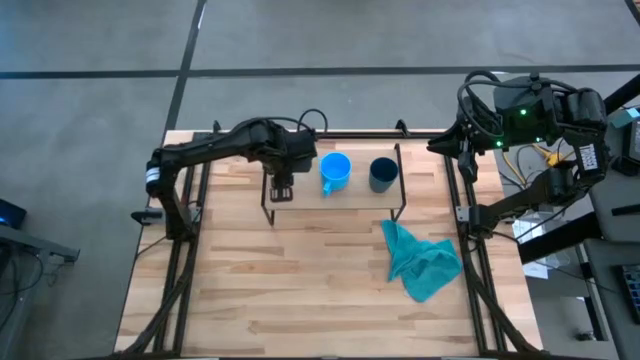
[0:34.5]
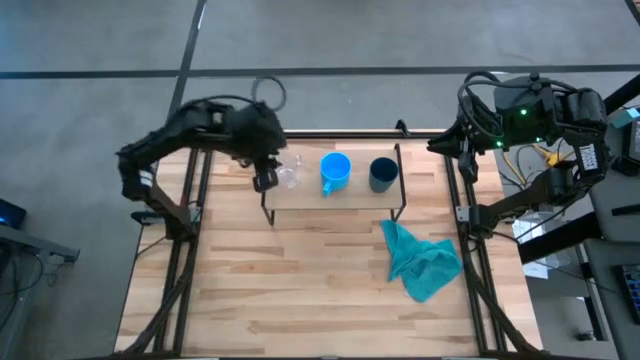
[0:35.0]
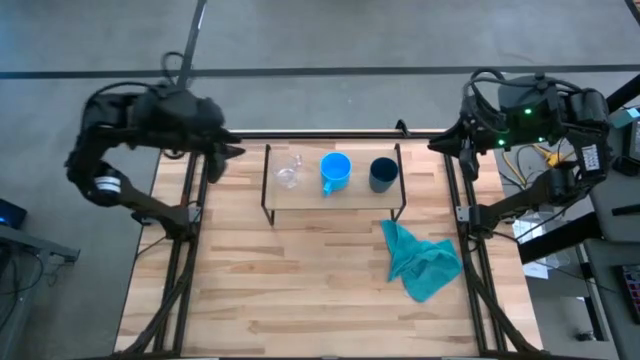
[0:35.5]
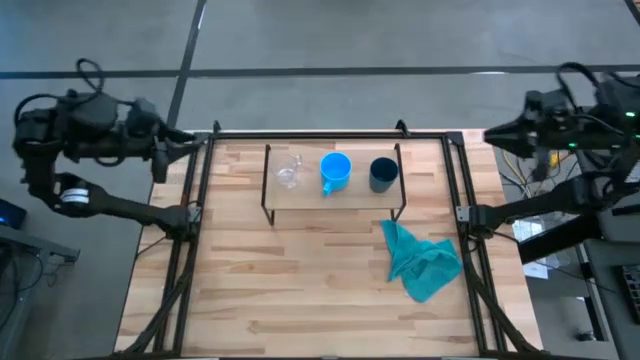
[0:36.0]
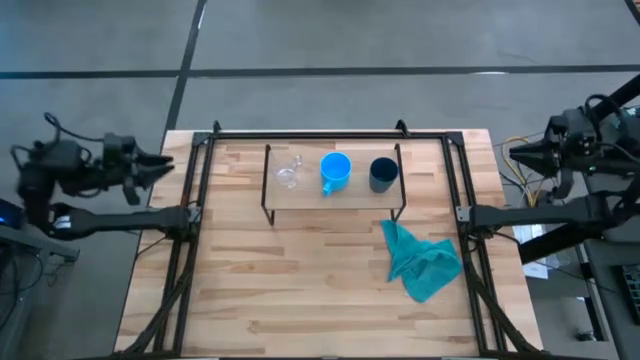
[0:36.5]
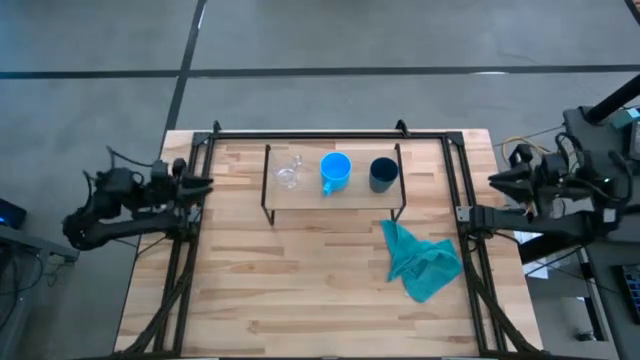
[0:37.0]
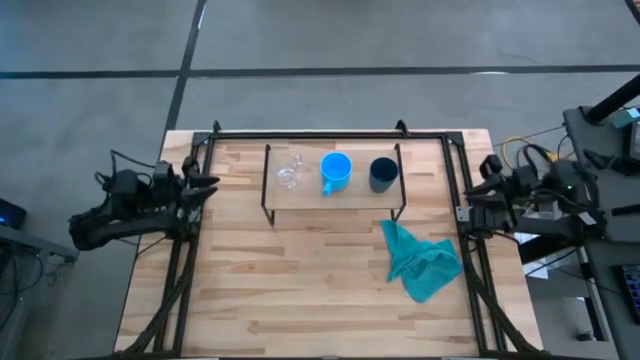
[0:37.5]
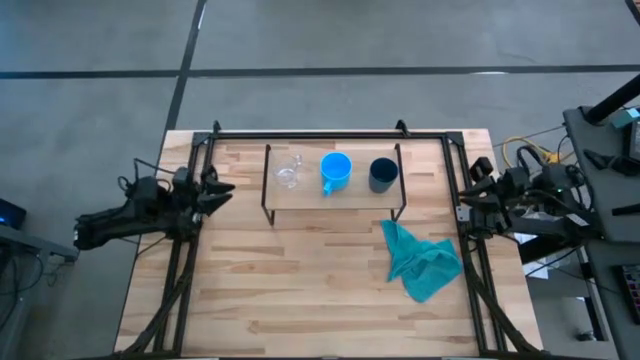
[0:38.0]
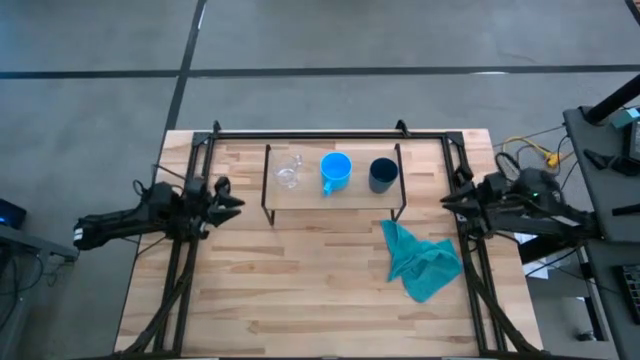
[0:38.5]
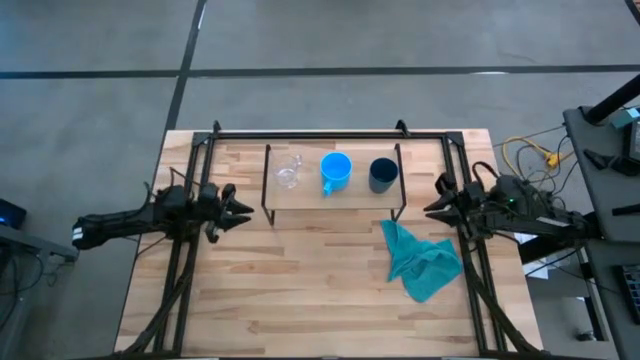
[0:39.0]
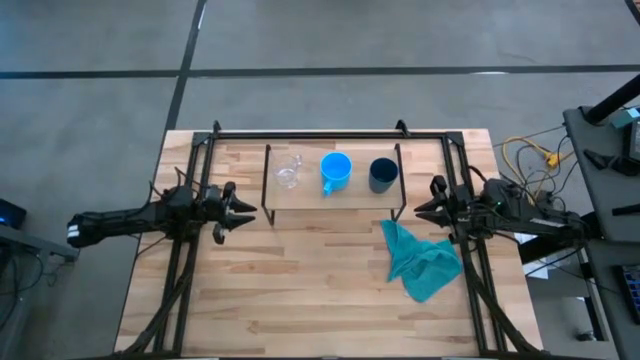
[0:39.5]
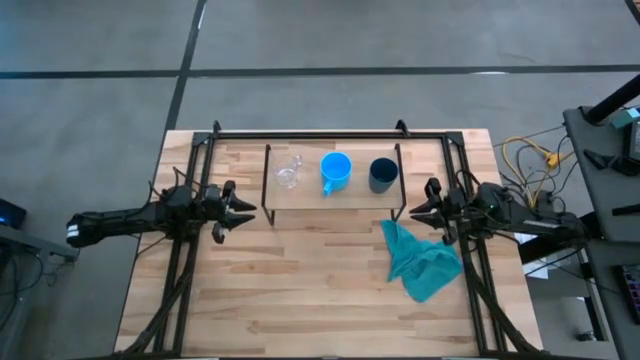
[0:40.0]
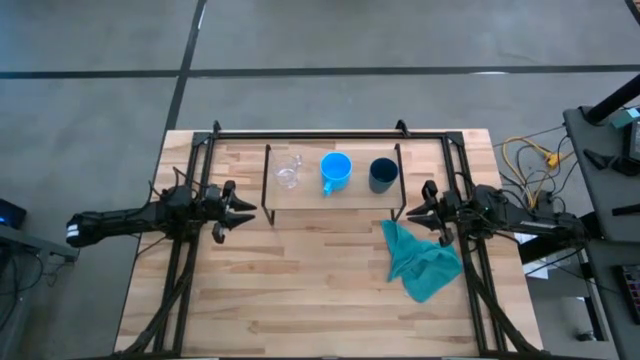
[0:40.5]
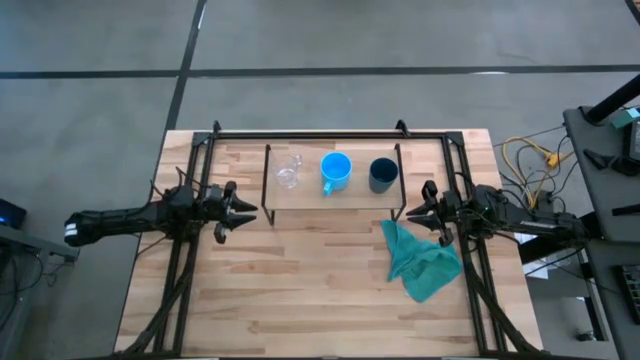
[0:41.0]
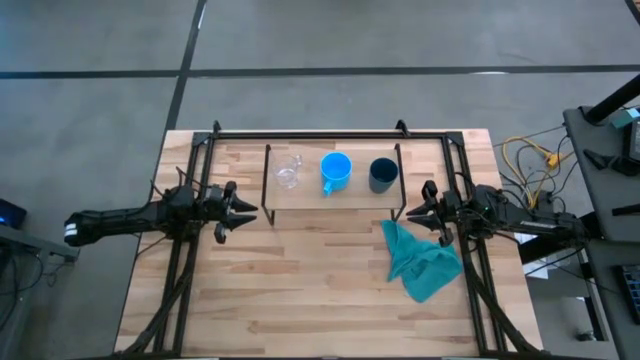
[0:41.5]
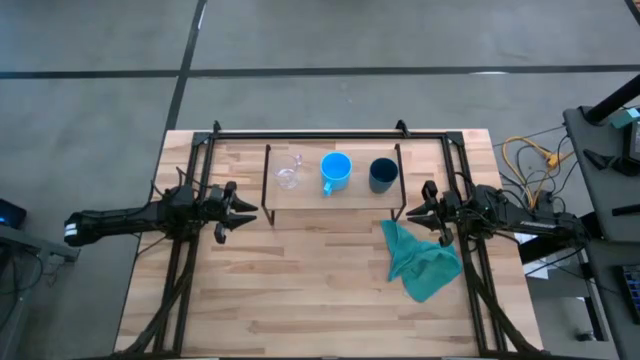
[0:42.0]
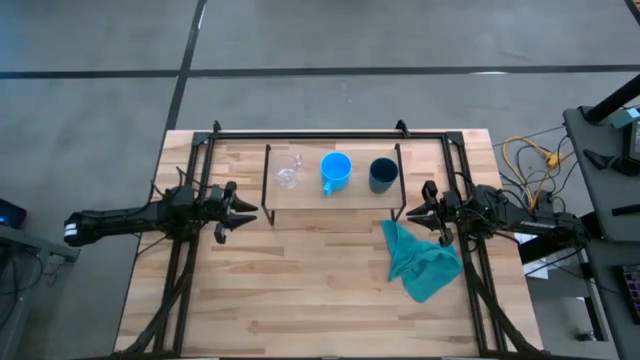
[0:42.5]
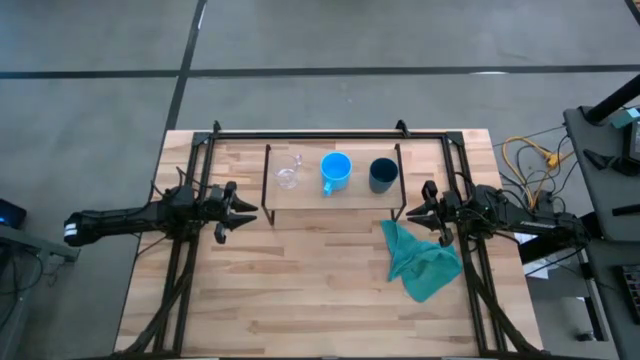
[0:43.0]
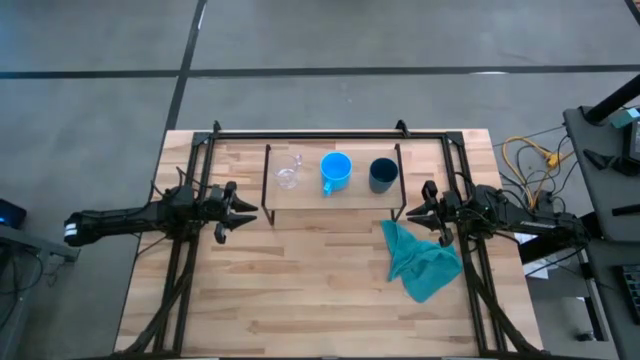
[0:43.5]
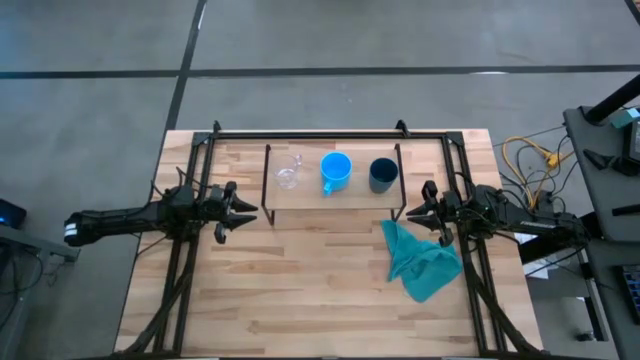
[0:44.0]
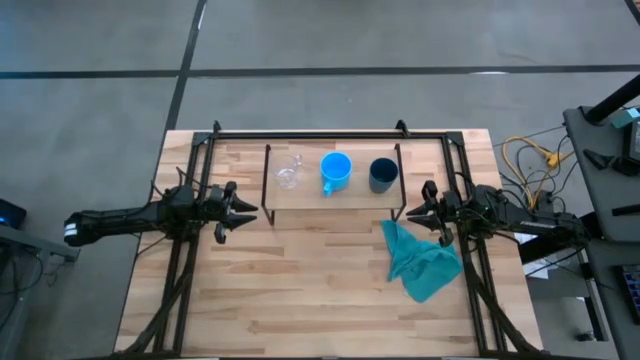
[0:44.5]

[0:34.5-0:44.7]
Task: Stack small to large cups/mugs on shelf
Return to Home Position

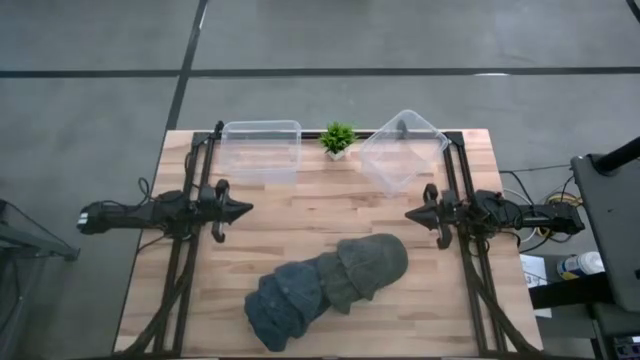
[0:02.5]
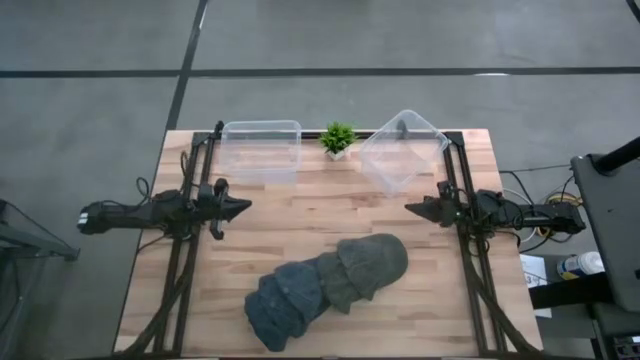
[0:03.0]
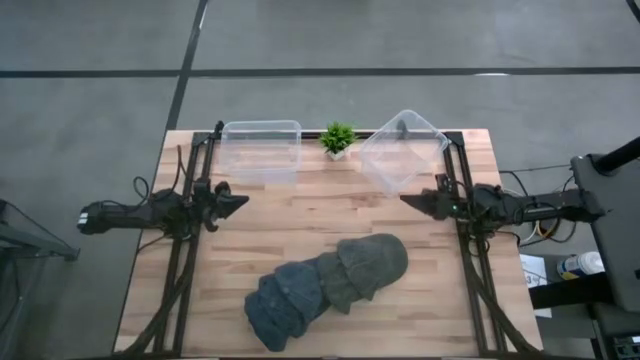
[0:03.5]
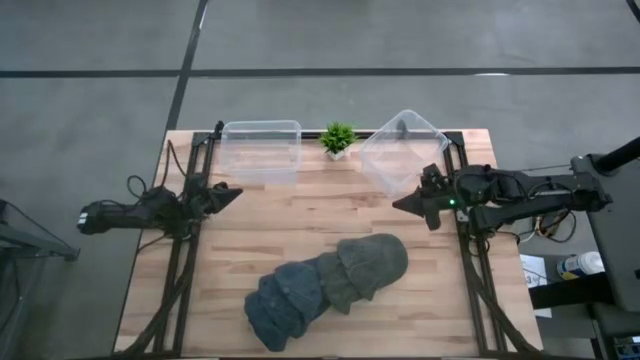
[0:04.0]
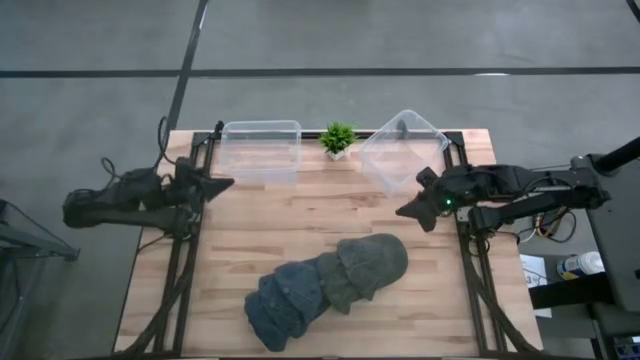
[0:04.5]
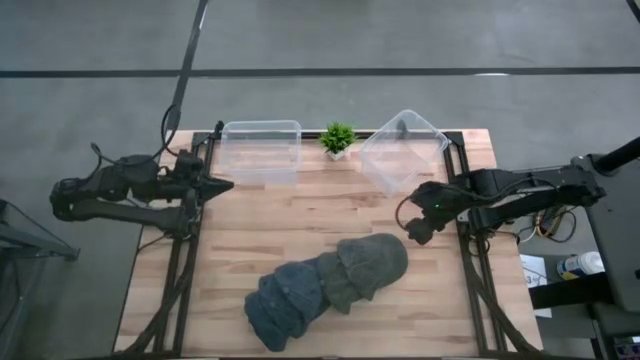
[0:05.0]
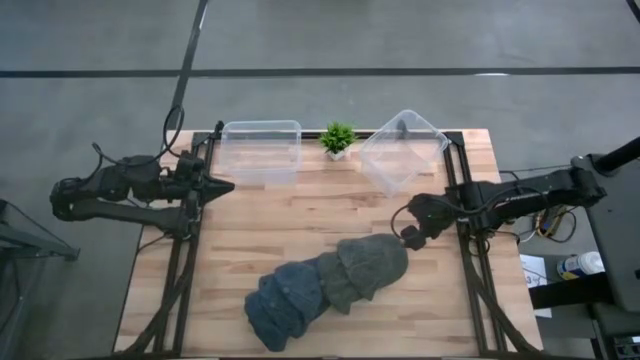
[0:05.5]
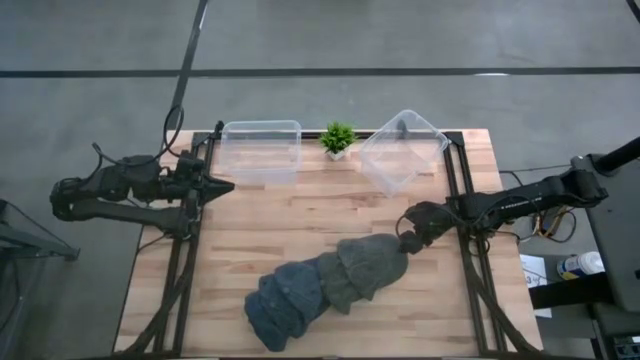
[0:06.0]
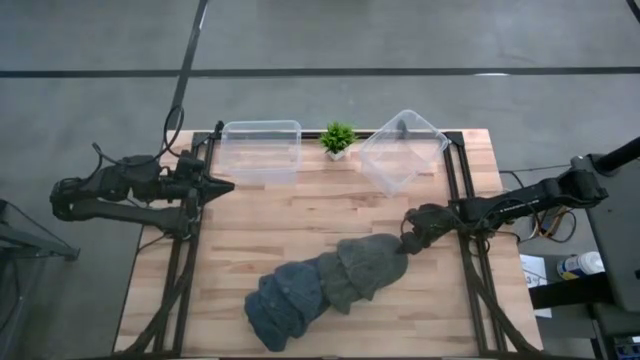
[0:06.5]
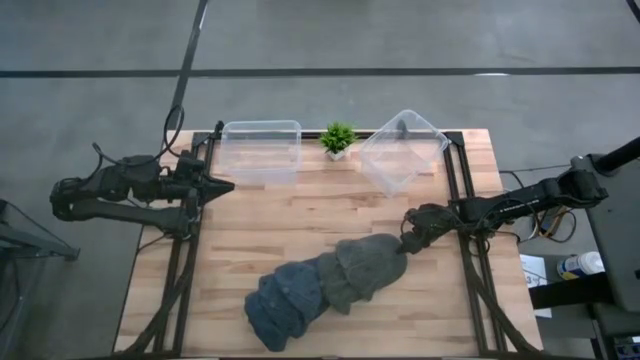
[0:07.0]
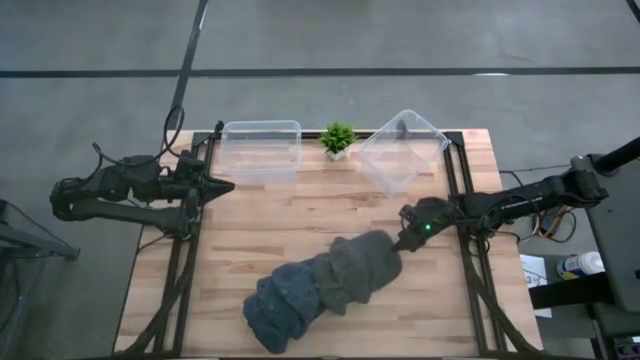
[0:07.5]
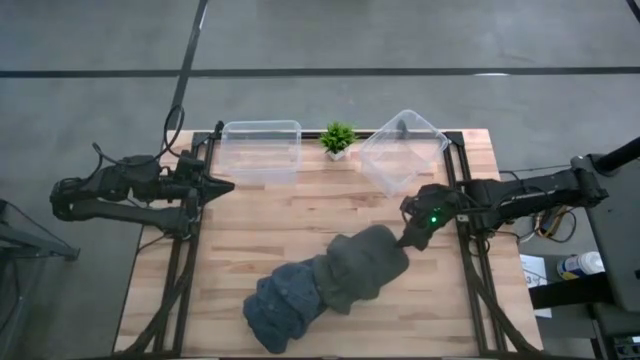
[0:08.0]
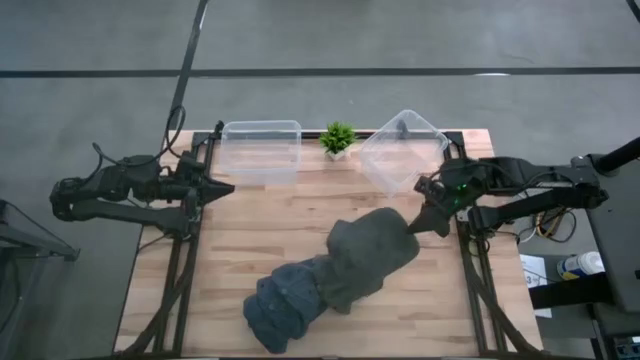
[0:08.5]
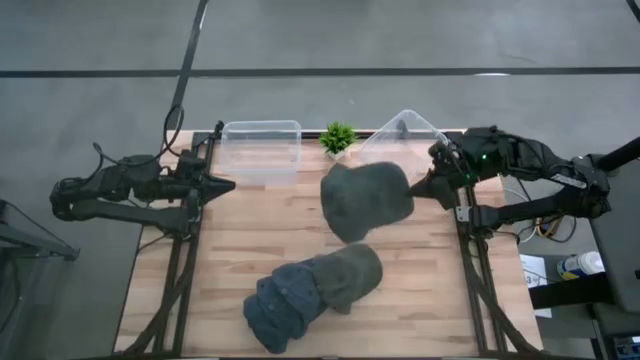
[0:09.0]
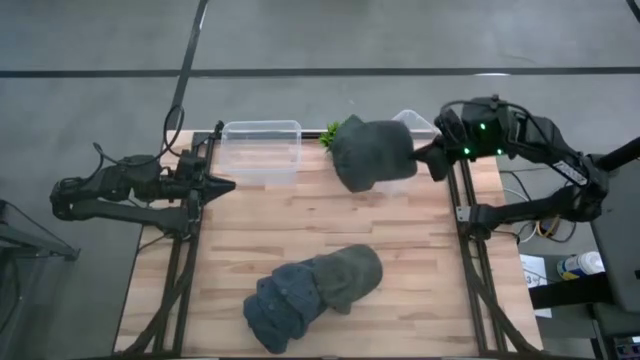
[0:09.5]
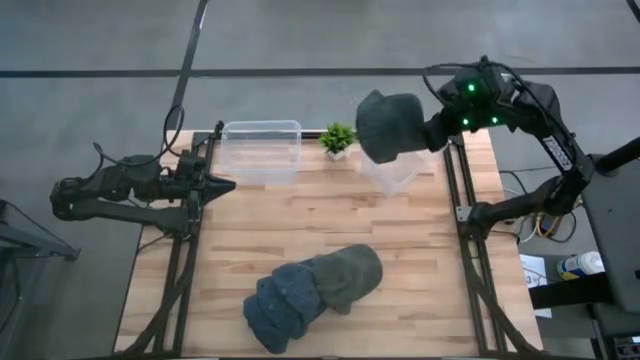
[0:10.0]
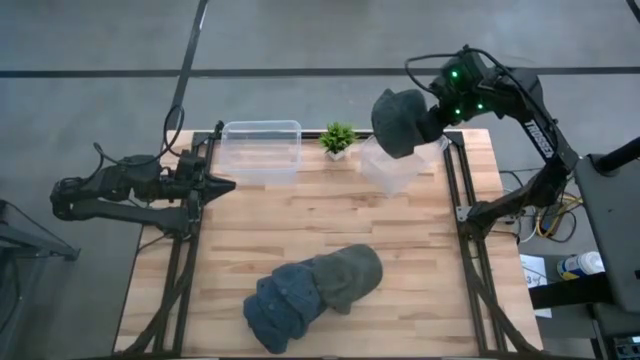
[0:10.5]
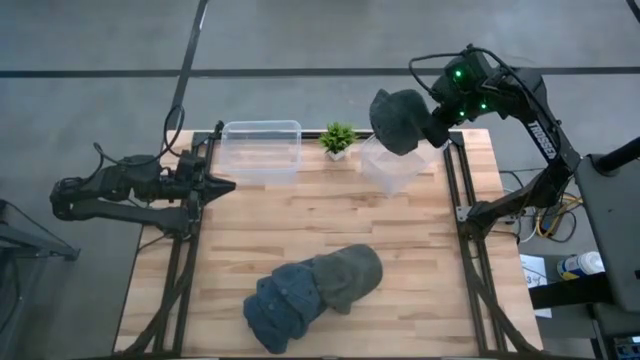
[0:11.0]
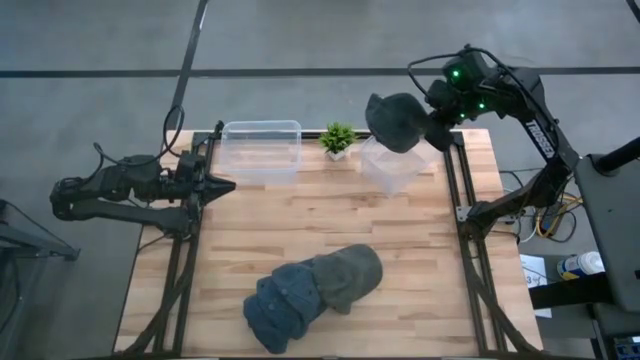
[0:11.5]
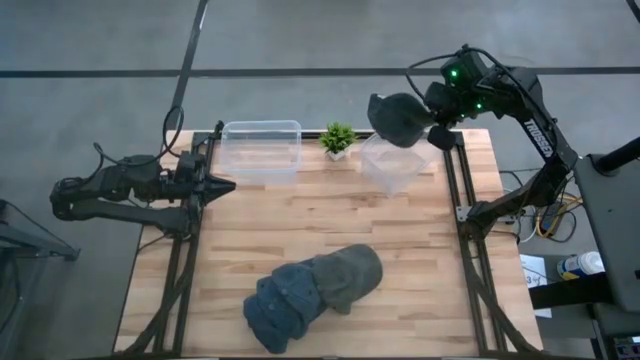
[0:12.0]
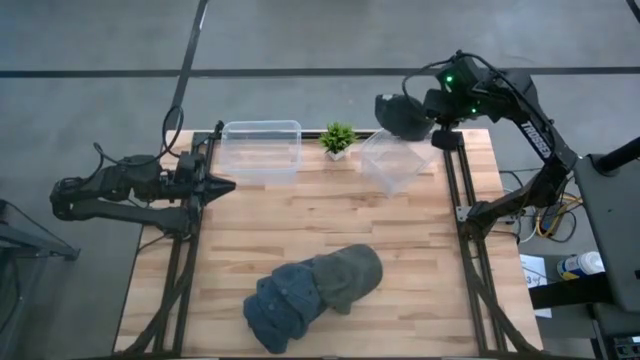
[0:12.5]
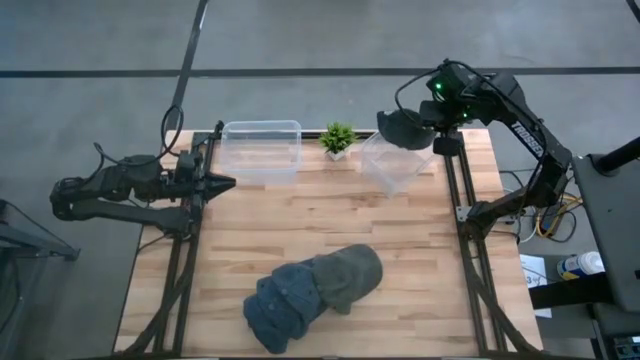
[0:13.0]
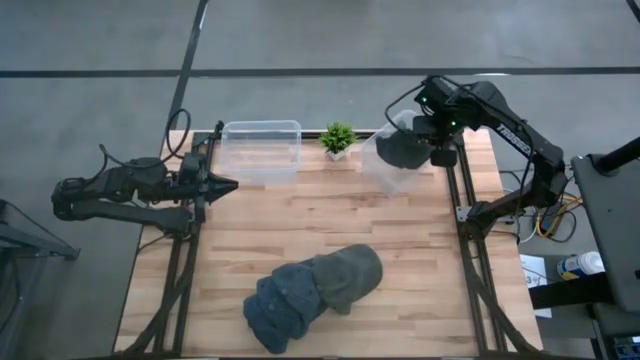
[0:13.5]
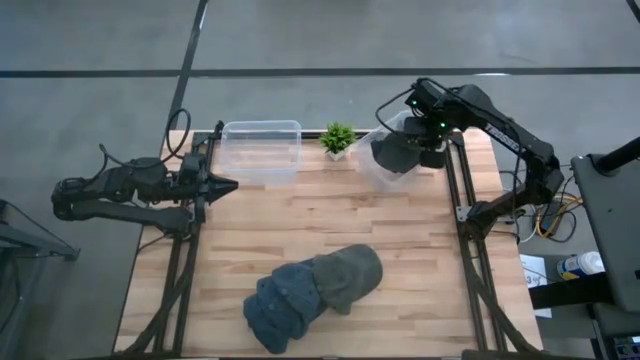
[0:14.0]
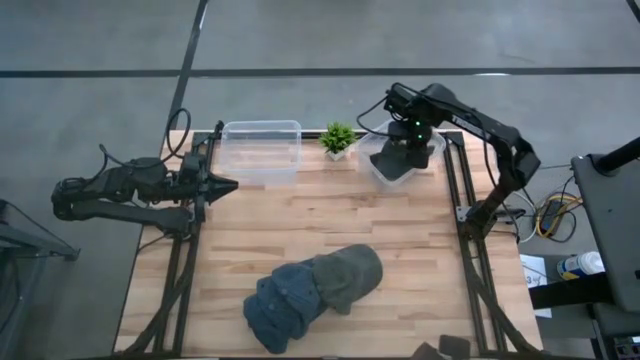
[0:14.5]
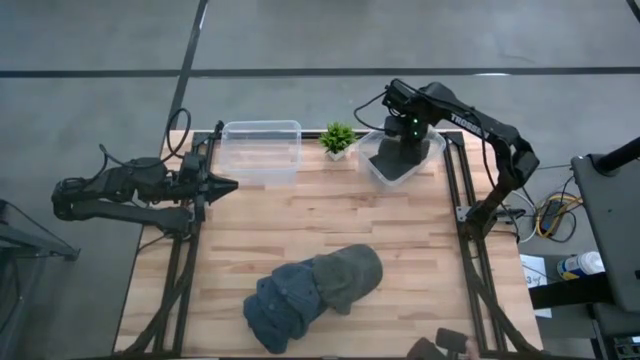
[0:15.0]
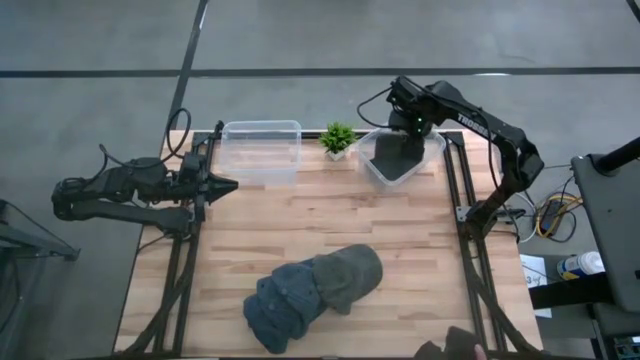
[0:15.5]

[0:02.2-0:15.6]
Task: Pick & Place hat
Put the top green cap into the right transparent bin
